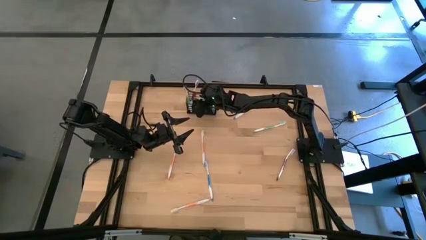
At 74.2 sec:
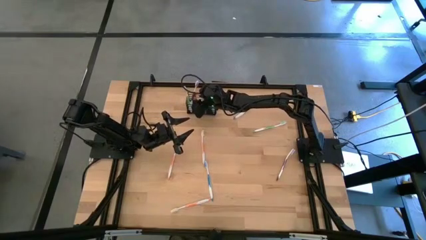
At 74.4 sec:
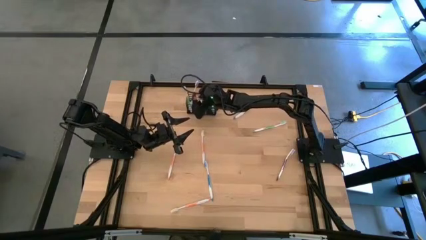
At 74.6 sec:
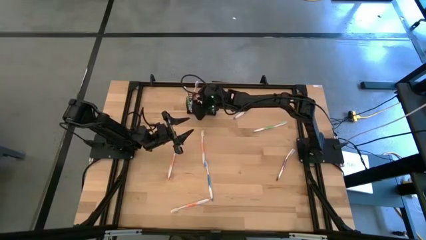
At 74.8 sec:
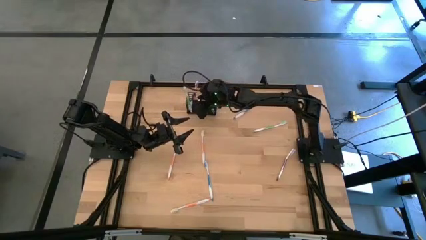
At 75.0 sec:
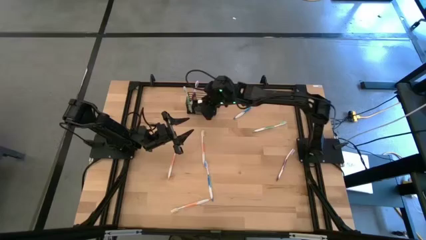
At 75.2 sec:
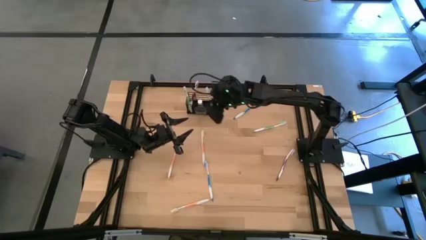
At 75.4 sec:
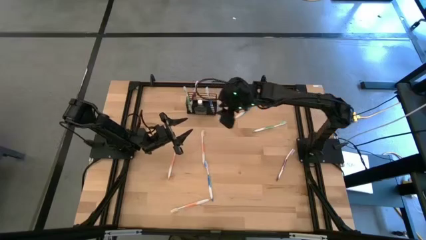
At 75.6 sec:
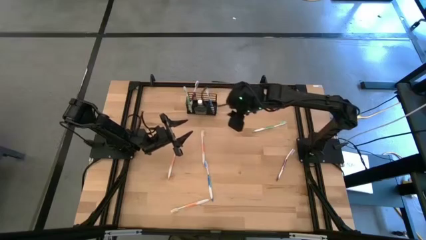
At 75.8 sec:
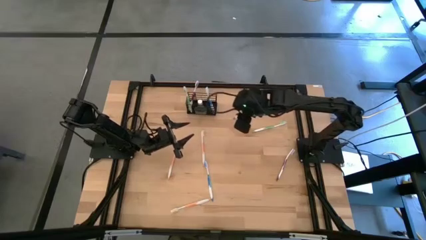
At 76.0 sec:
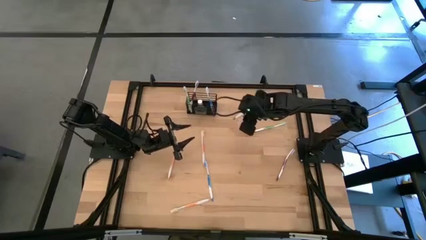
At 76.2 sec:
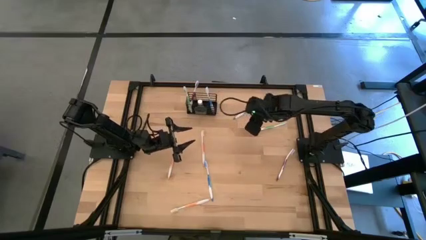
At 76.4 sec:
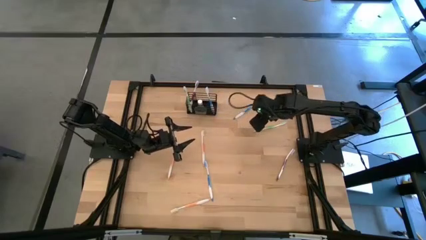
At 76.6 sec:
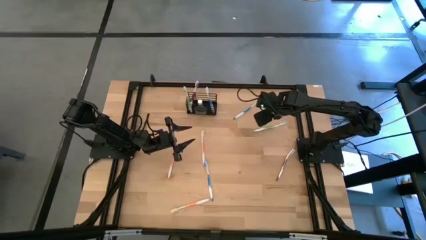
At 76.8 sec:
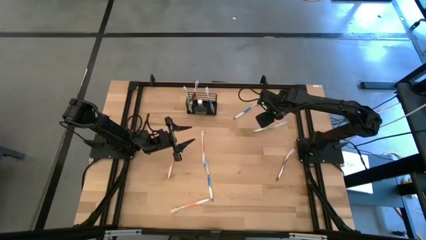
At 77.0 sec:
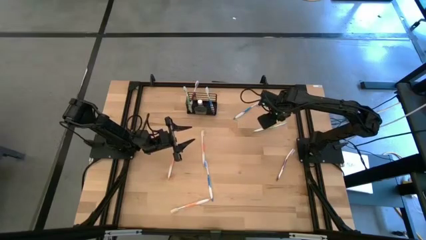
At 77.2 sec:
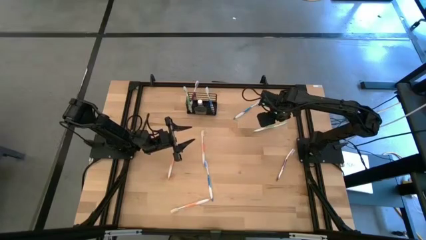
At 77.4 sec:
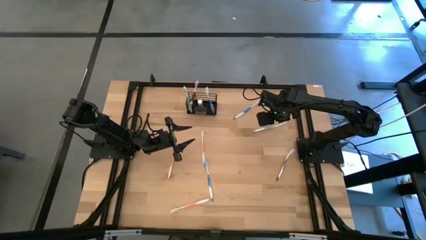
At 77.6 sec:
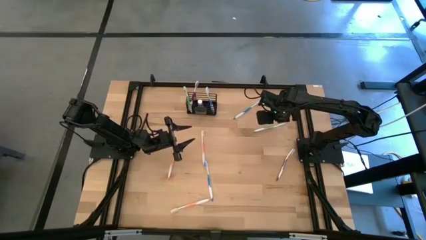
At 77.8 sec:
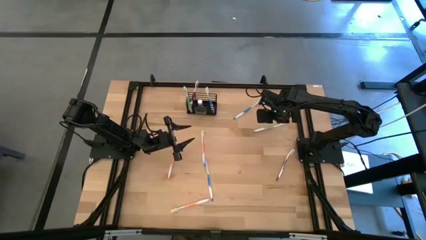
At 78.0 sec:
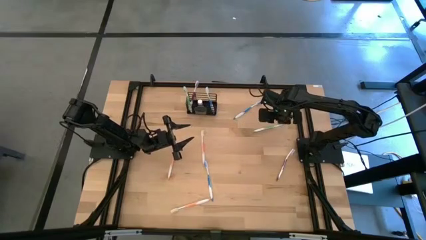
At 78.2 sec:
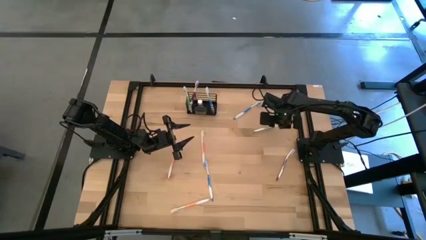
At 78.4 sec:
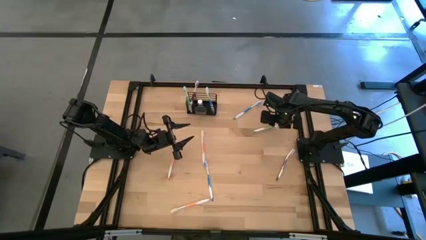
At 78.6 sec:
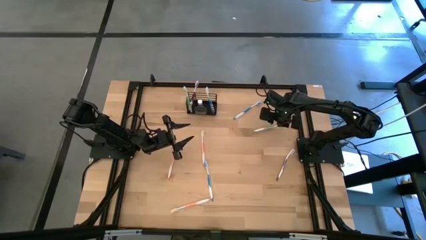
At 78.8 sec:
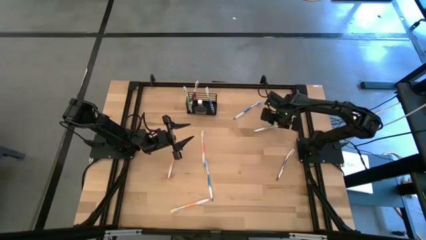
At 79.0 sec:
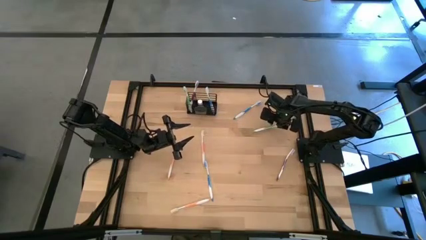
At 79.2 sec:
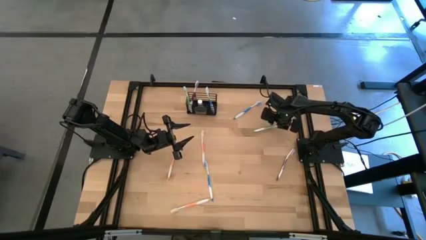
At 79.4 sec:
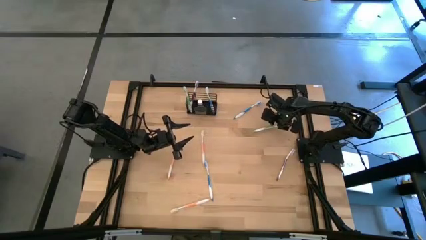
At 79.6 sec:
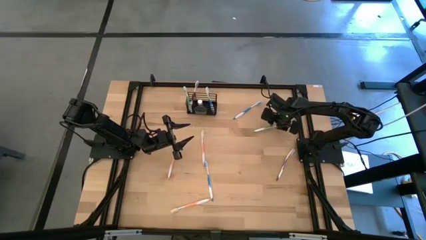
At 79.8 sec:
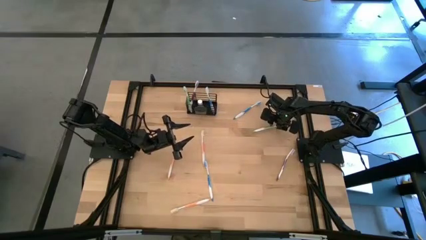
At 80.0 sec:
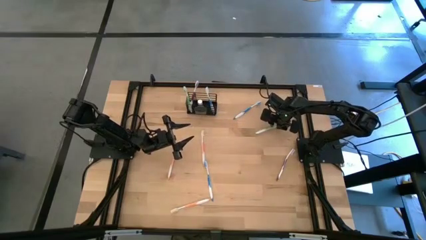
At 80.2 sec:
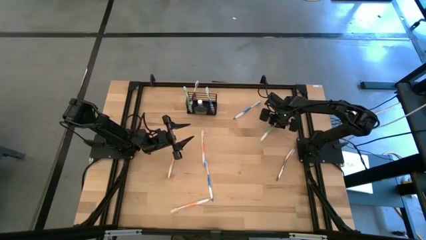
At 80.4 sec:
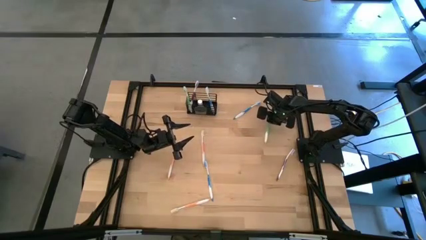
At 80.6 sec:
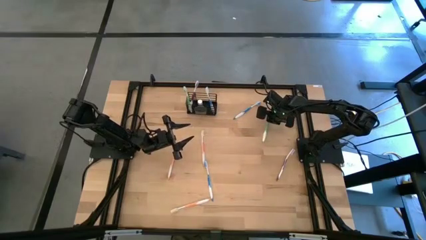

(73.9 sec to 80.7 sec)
Task: Pick & Place toothbrushing station
Put the green toothbrush into the black wire organizer

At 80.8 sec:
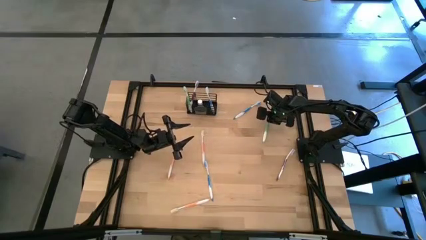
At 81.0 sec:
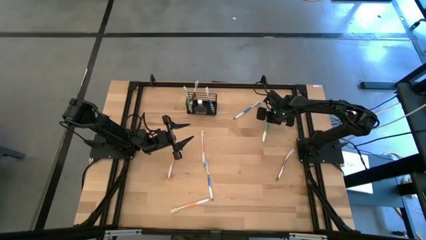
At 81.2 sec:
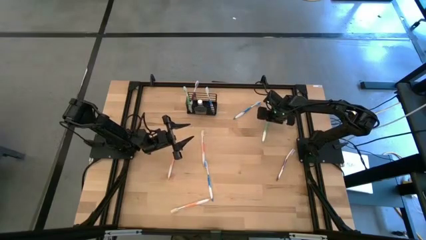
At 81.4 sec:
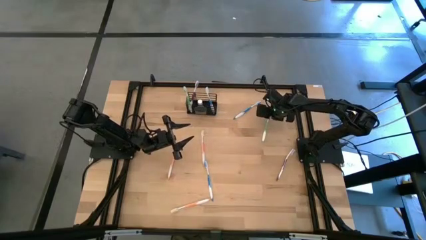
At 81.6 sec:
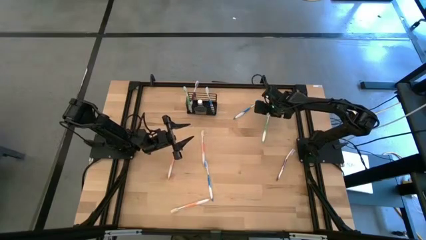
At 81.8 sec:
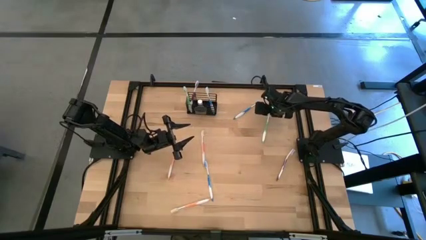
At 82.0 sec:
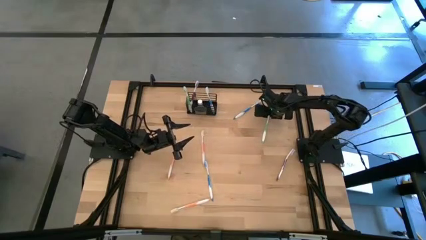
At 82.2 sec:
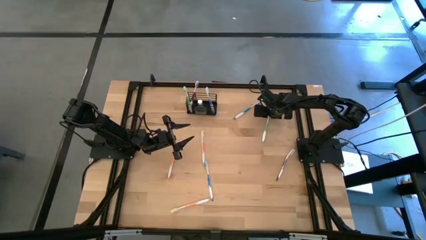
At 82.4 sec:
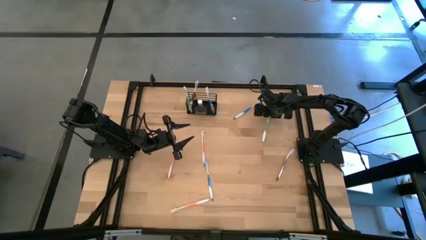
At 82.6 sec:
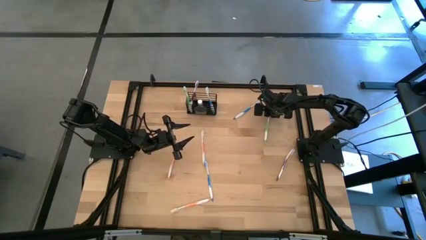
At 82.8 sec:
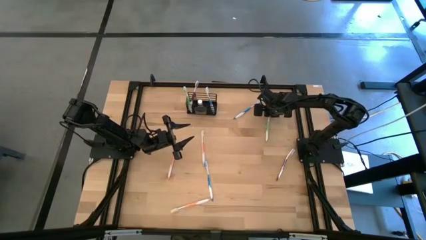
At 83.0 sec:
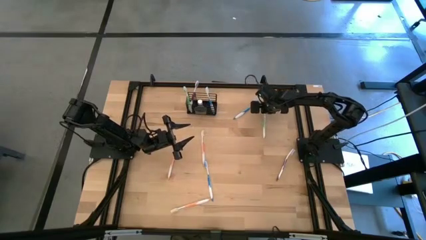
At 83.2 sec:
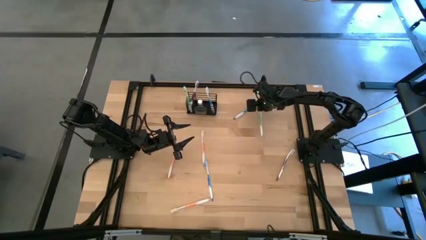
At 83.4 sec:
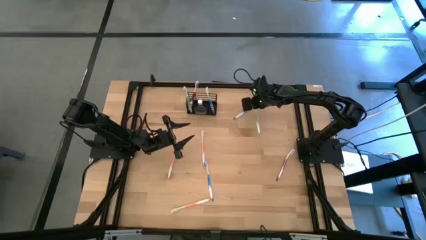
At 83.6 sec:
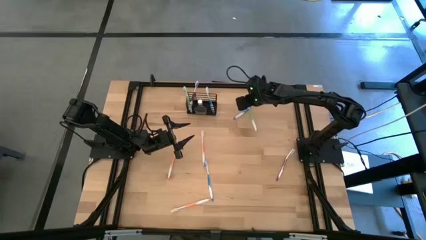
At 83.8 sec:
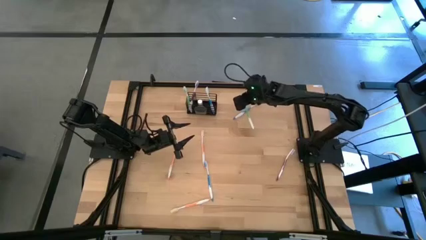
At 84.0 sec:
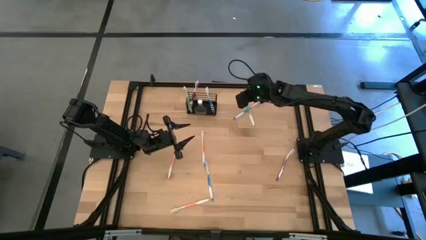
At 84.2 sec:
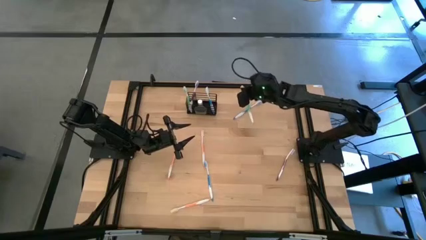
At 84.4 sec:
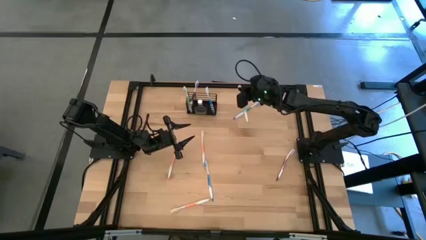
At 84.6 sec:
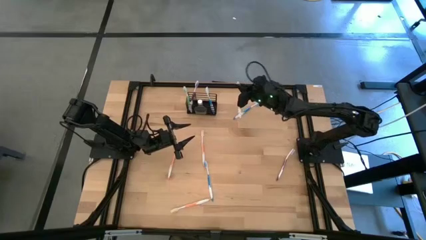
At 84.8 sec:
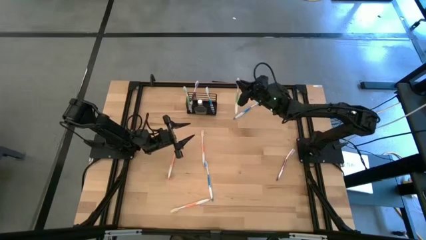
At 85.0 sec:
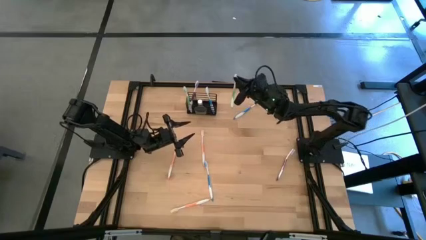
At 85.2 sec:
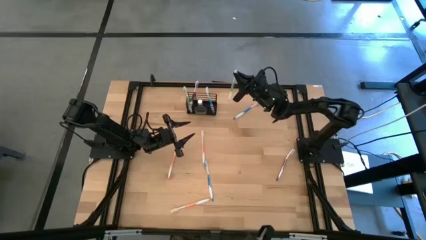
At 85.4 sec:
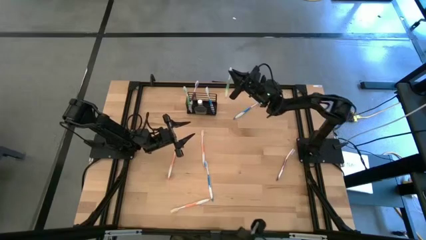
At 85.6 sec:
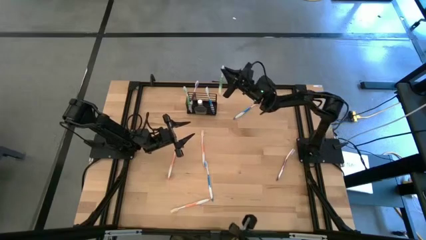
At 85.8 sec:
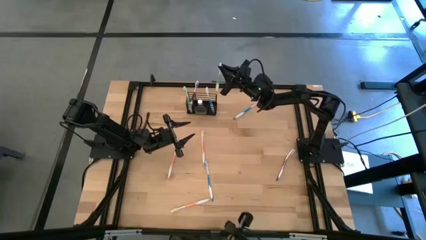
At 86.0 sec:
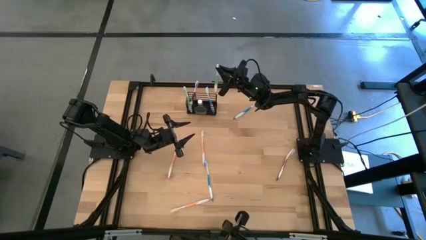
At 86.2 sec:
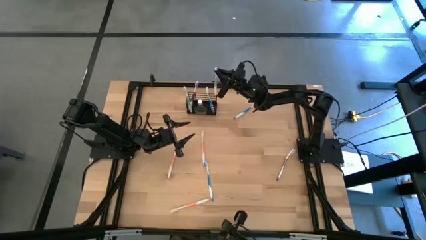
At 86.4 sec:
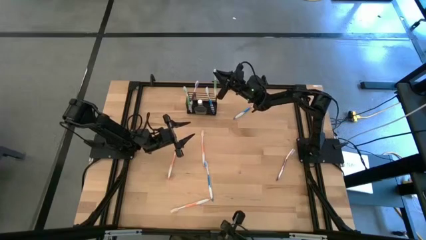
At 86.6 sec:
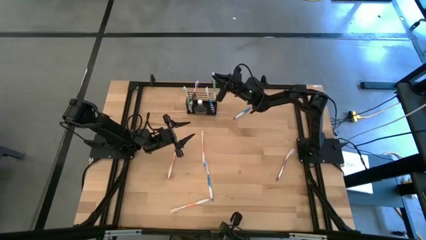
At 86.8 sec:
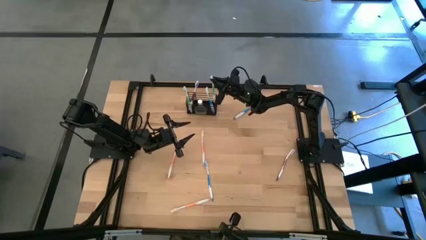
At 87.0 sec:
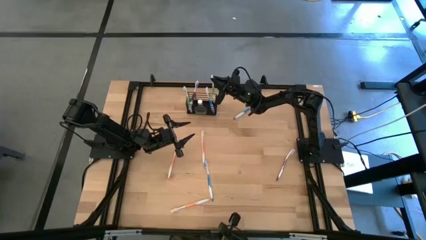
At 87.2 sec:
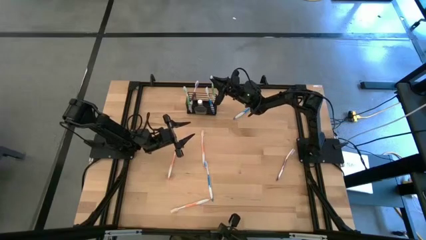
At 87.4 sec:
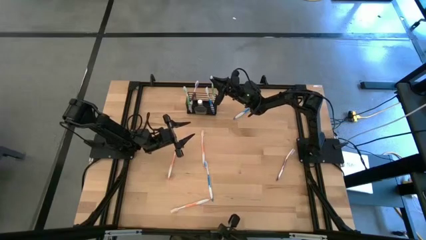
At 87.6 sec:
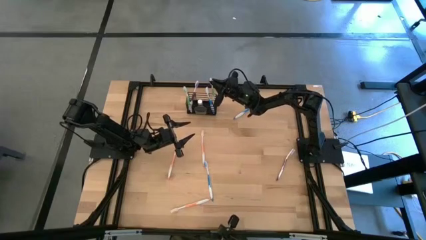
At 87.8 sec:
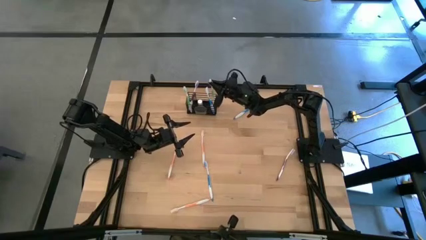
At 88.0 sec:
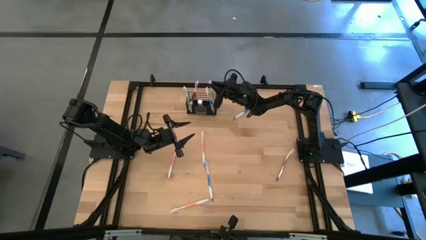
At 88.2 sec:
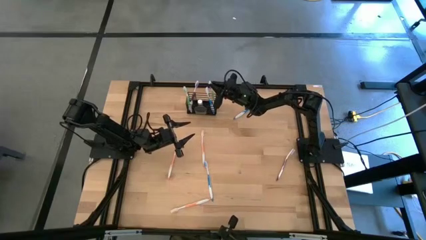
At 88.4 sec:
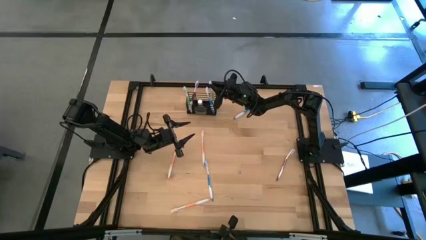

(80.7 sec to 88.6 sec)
Put the green toothbrush into the black wire organizer
